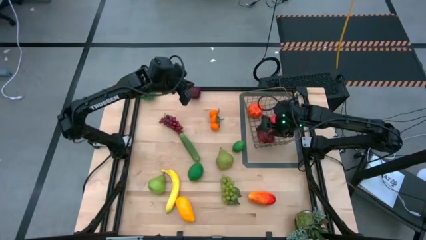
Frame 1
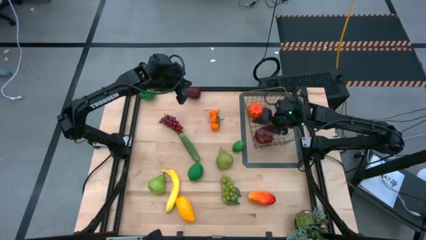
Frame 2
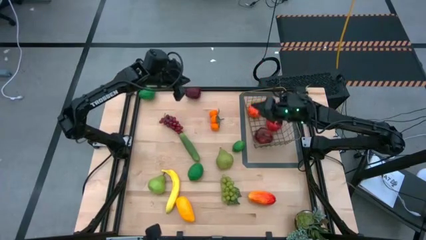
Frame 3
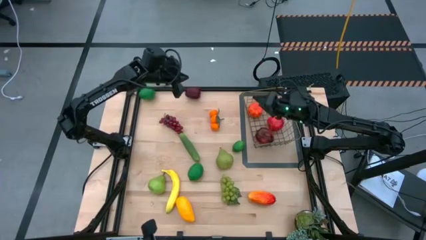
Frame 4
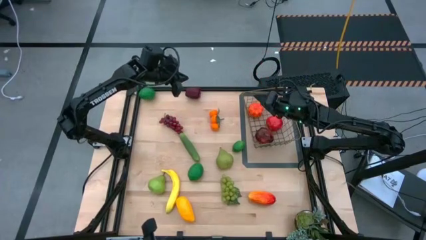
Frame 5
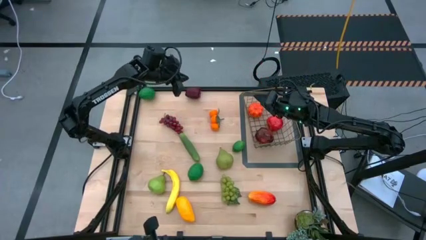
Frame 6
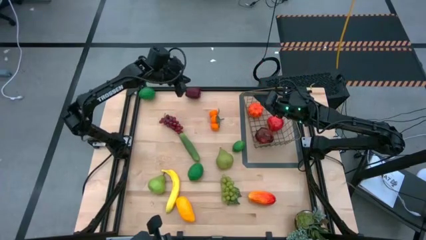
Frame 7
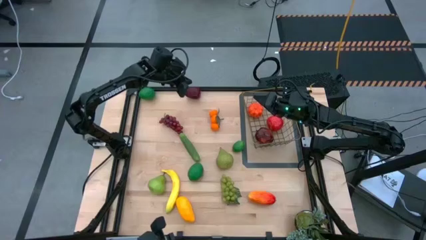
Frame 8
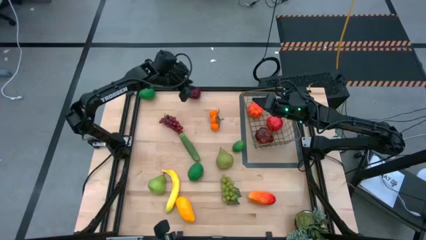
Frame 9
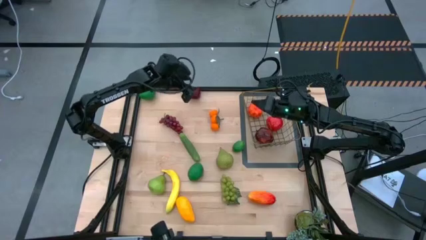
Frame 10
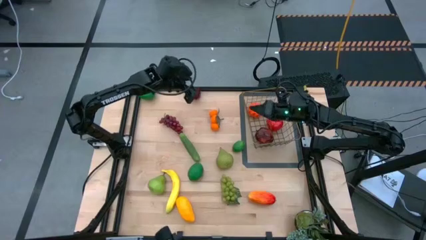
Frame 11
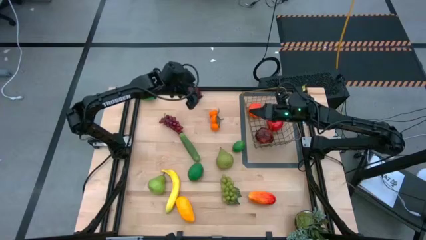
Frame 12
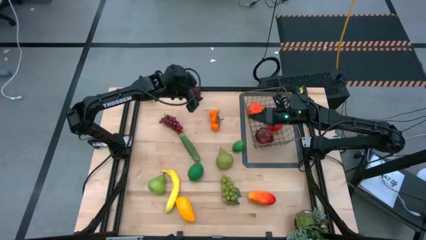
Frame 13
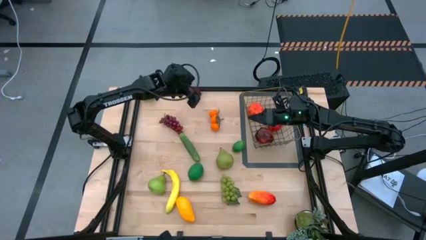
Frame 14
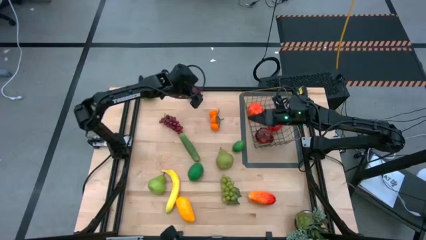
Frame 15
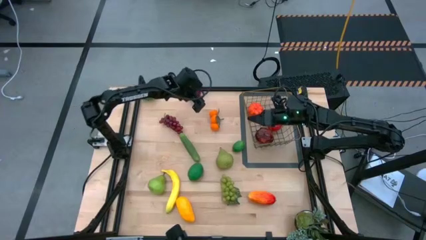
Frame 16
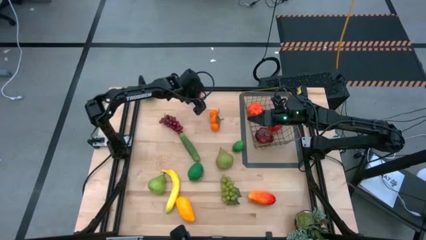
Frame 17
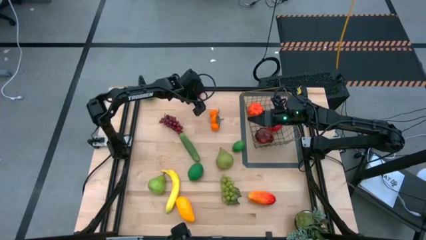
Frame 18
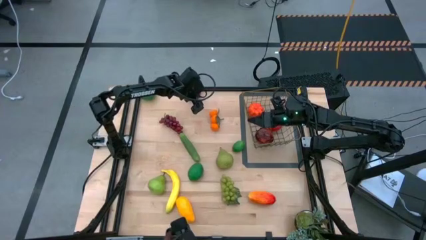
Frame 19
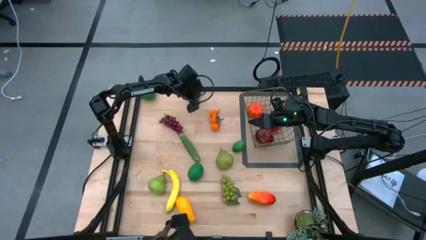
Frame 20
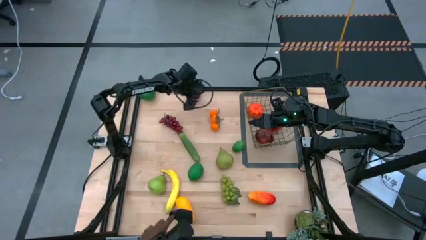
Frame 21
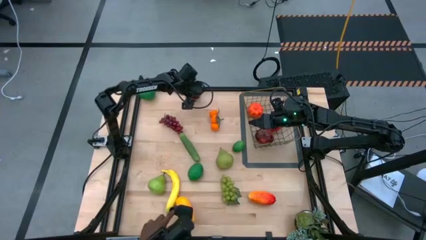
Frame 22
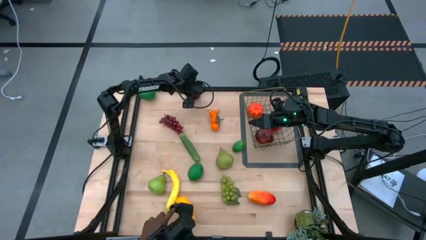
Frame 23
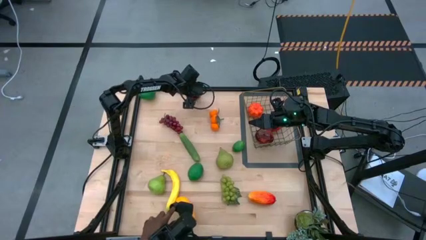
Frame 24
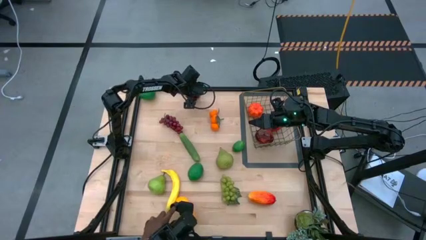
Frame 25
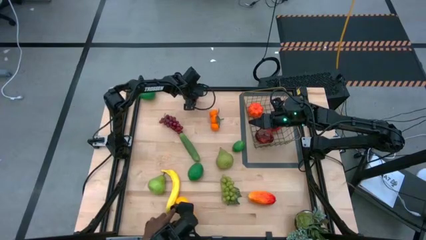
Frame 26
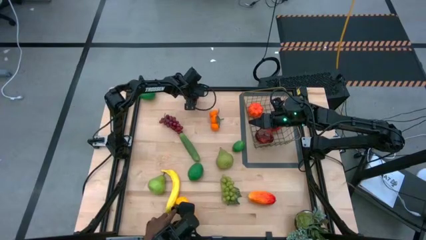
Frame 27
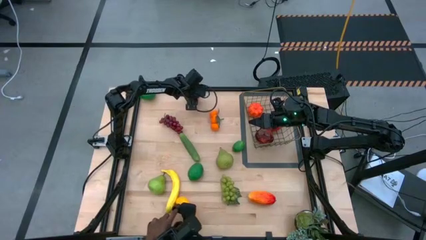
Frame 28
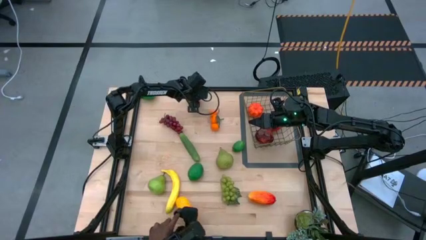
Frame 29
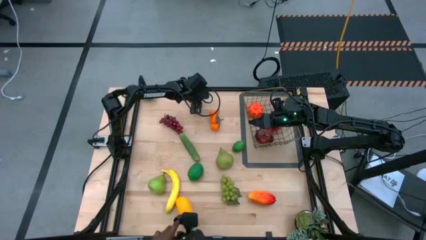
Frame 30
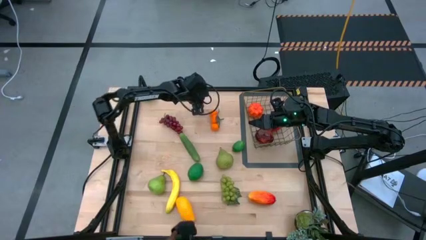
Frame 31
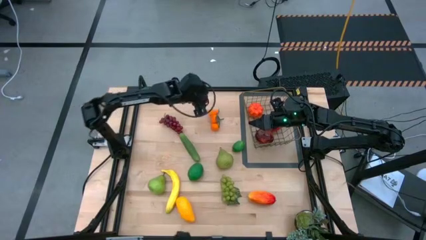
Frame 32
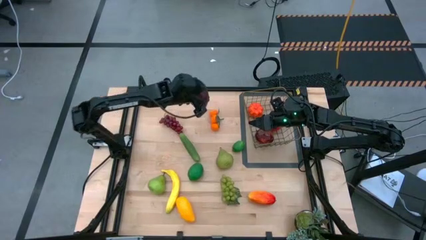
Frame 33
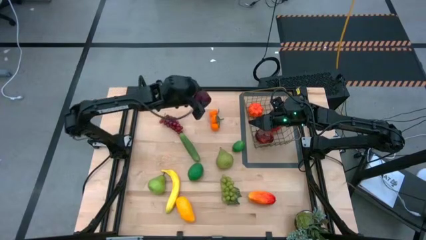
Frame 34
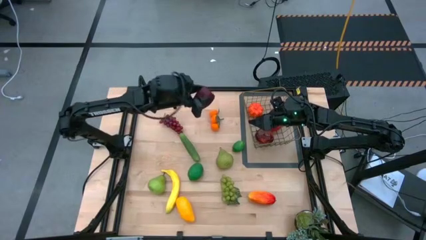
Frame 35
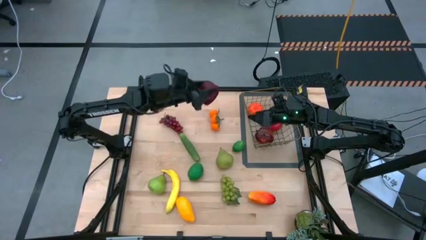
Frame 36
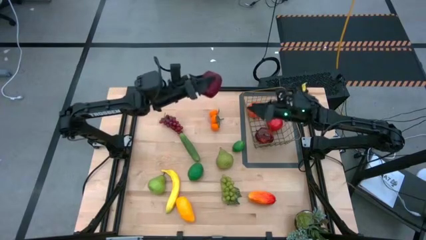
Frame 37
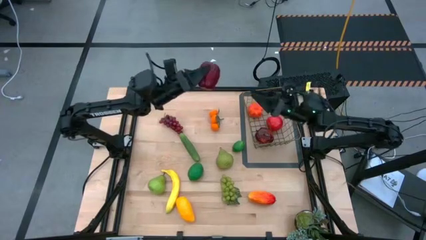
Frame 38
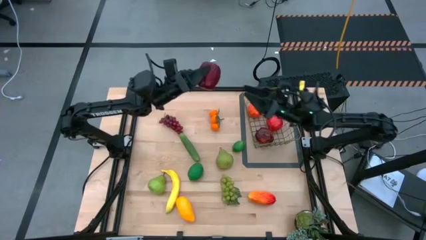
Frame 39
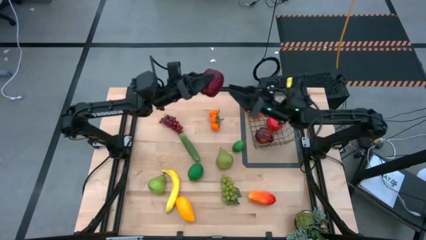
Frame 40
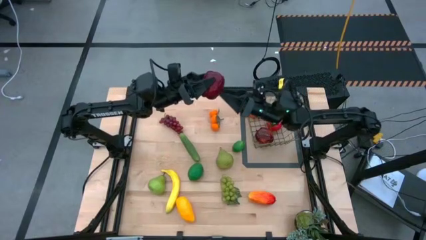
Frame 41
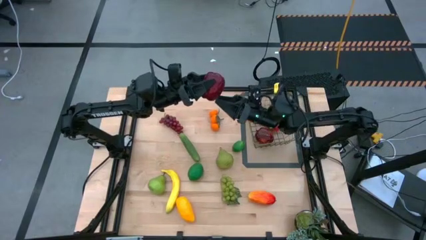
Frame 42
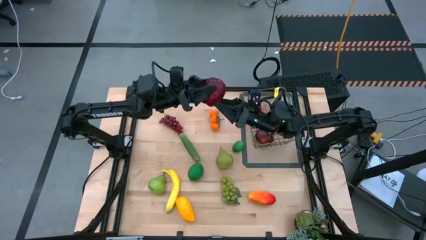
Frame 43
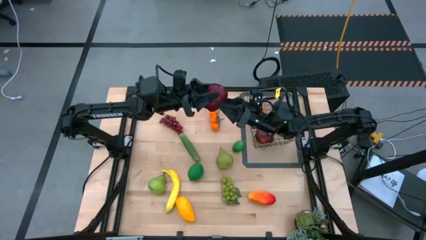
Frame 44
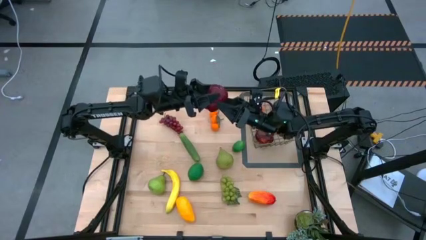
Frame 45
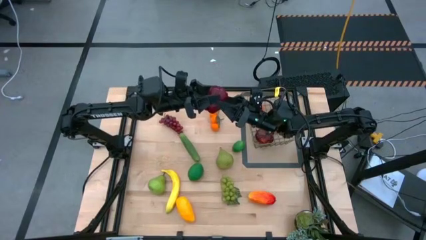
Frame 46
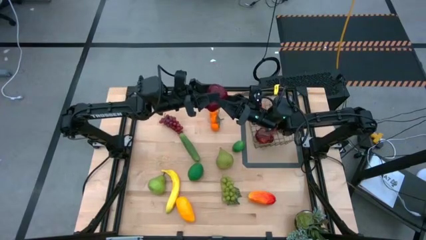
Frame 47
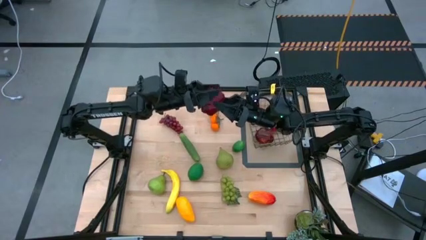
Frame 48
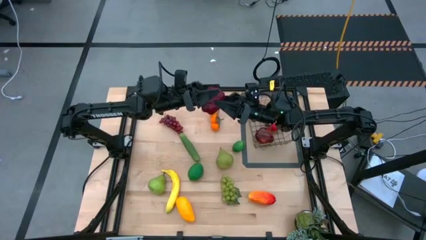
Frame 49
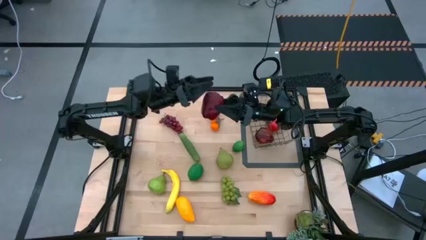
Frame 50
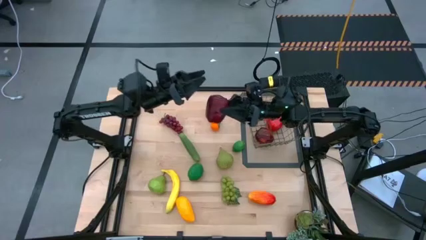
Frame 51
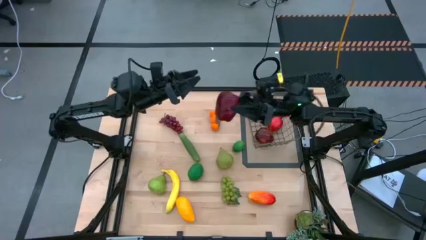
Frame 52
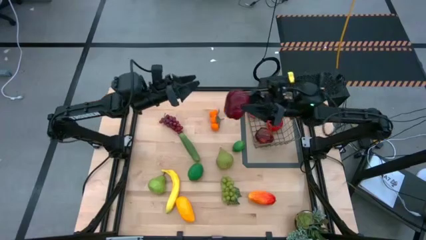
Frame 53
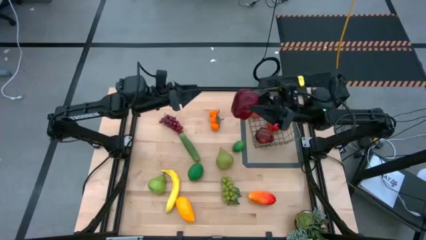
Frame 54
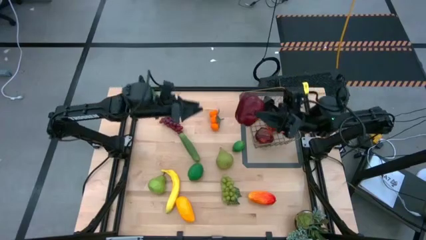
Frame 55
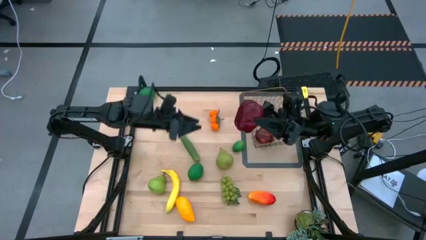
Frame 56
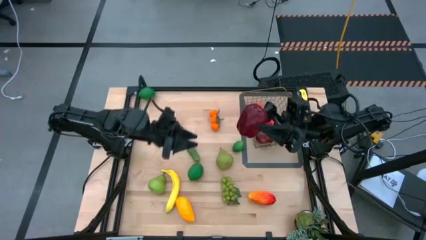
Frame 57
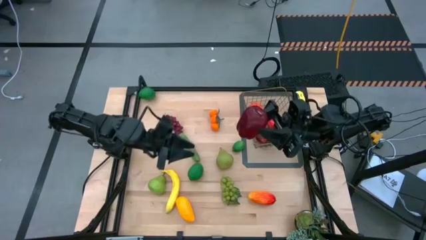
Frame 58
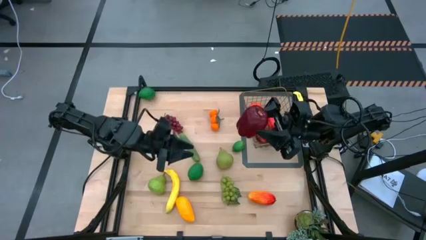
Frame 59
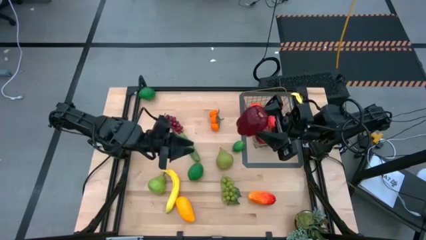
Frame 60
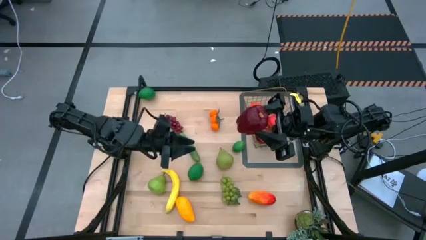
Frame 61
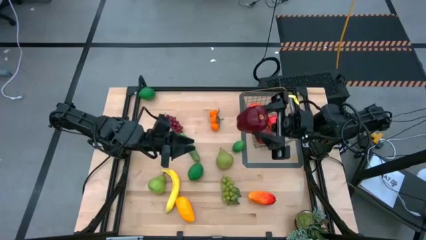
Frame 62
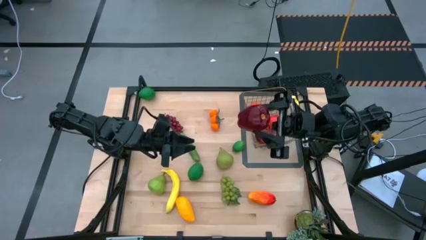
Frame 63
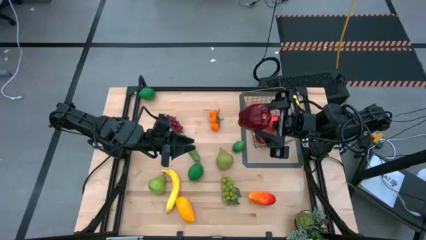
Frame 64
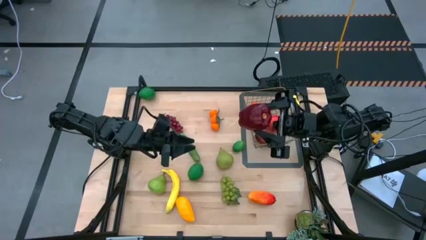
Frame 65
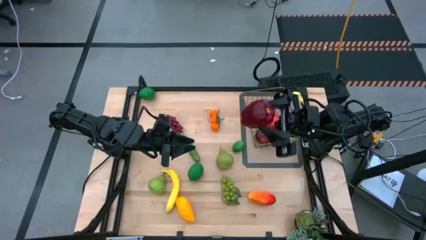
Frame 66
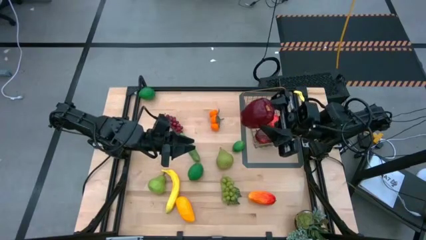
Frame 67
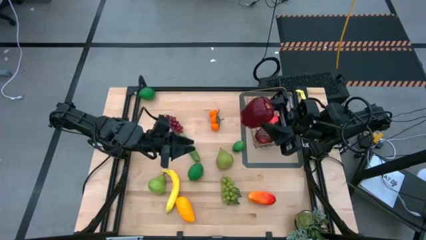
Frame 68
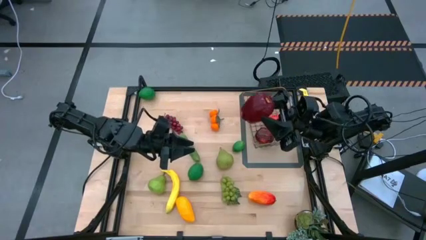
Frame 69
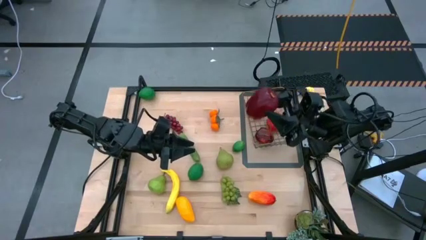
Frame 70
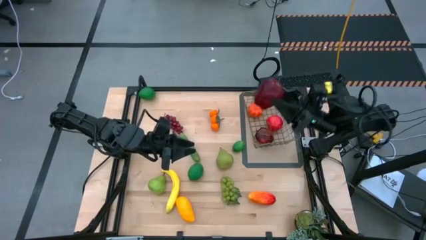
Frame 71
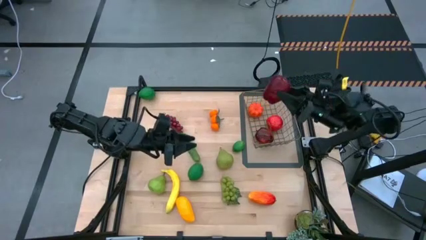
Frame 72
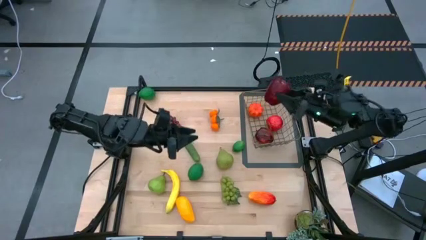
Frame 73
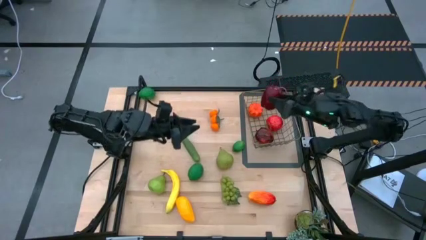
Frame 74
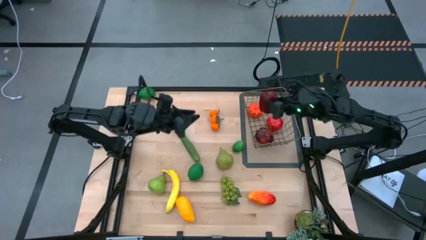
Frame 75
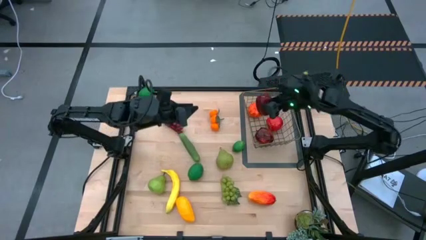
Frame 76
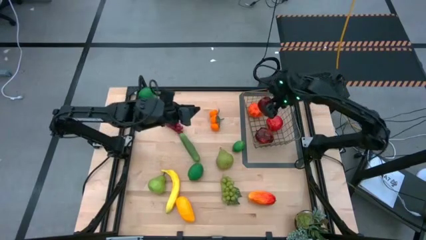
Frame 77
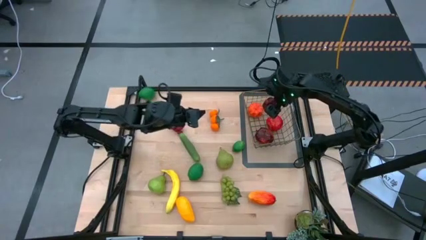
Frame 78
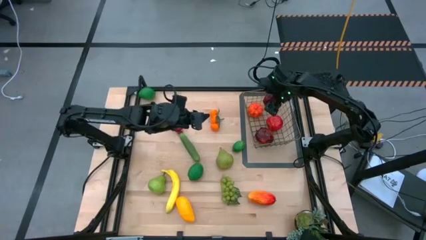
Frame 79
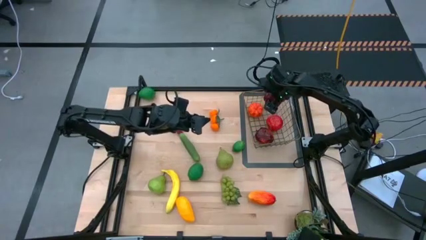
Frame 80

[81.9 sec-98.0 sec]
Task: Build produce basket
Put the red apple into the wire basket

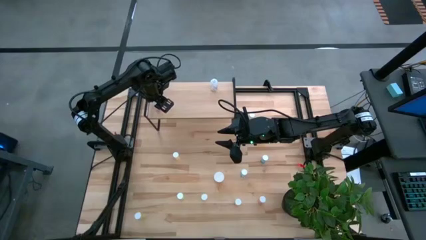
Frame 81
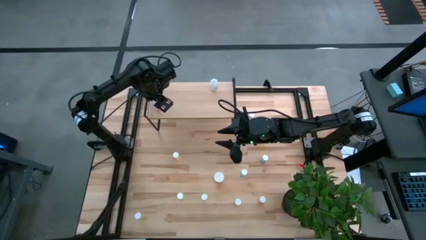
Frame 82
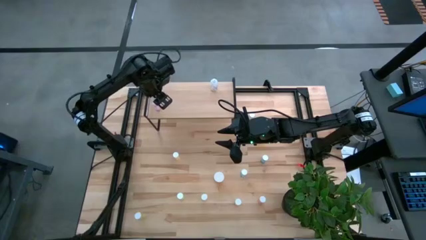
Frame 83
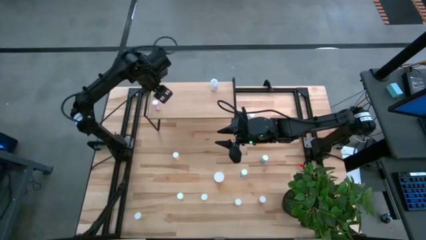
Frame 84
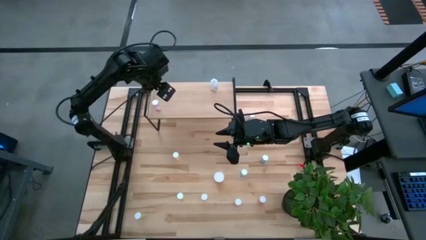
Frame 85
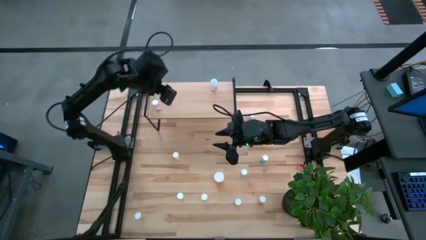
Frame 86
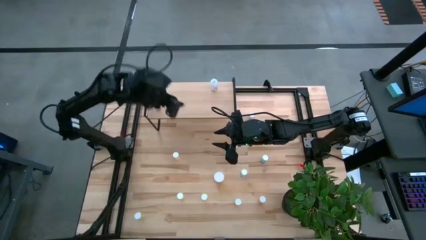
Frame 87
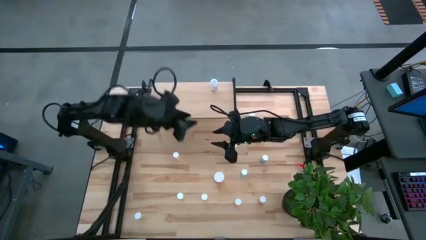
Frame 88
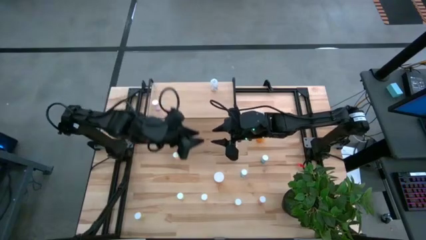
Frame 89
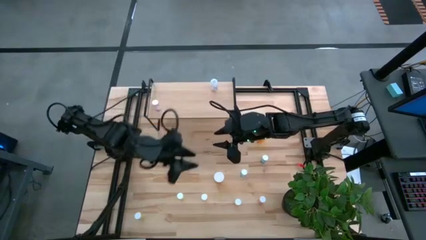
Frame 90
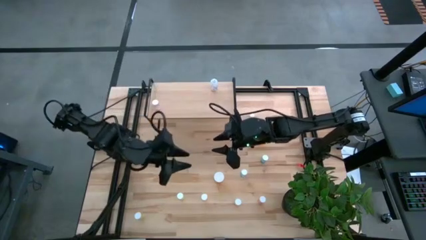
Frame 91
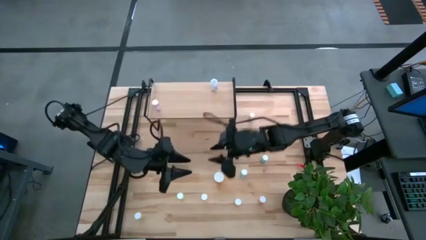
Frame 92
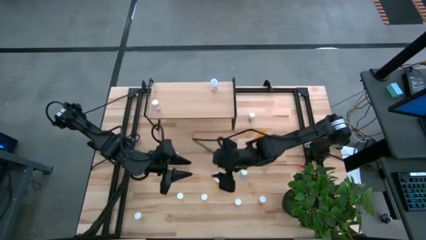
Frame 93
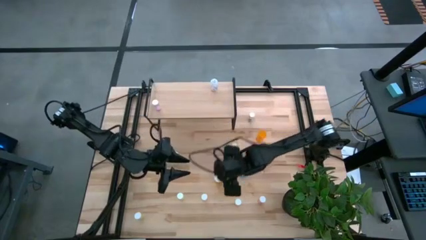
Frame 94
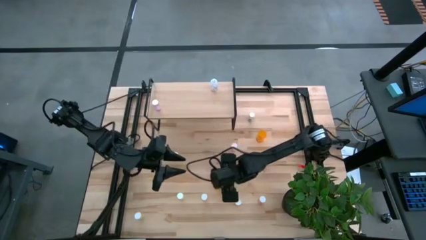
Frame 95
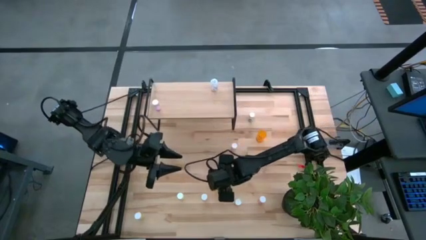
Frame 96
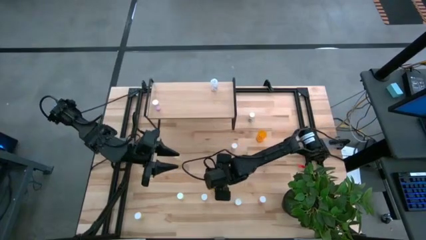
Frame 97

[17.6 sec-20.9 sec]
Task: Pick and place medicine bottles onto shelf by color
Put the orange pill bottle on the shelf
